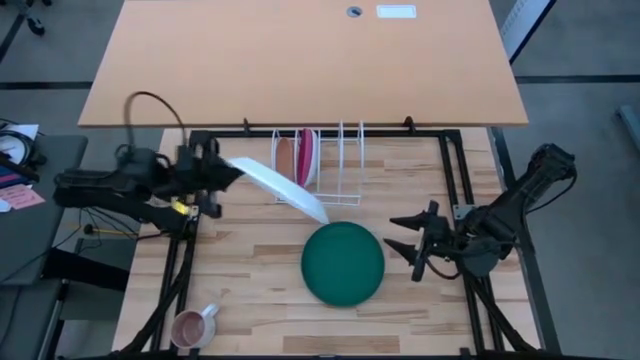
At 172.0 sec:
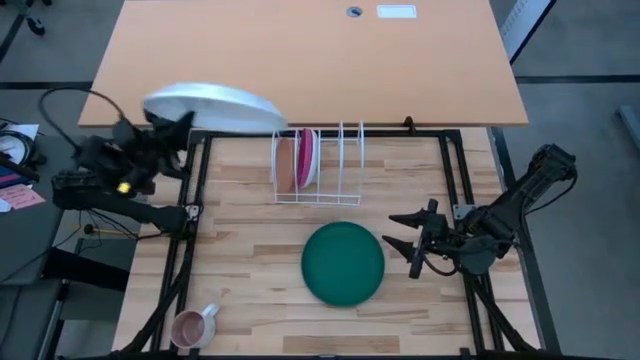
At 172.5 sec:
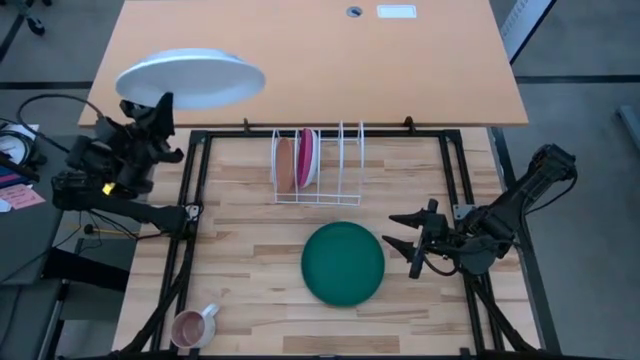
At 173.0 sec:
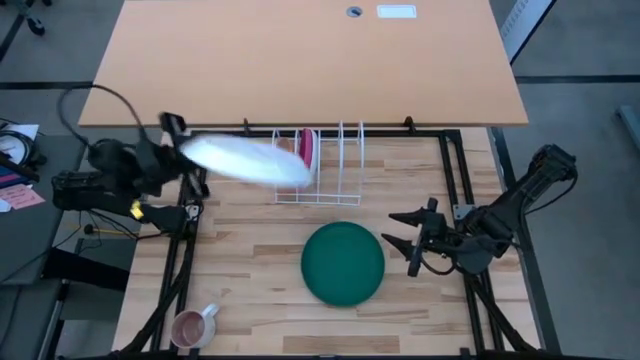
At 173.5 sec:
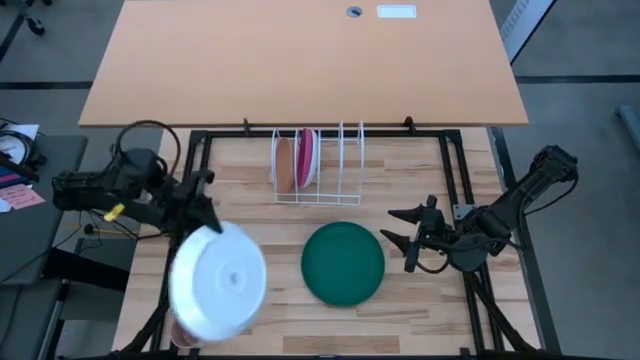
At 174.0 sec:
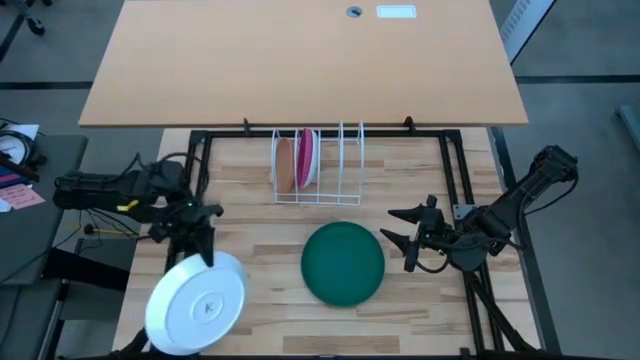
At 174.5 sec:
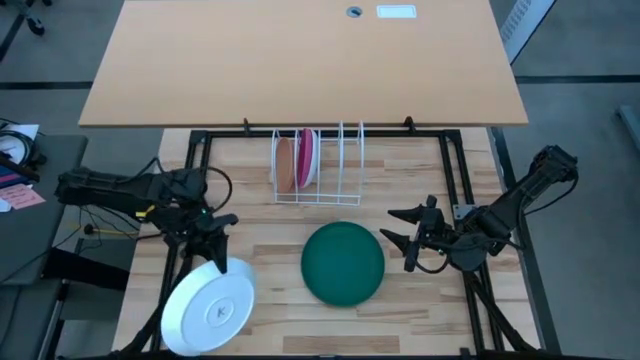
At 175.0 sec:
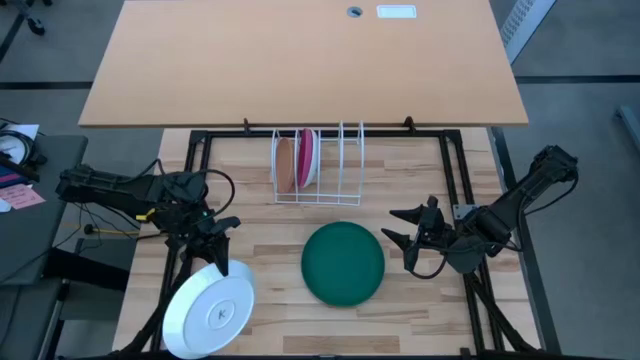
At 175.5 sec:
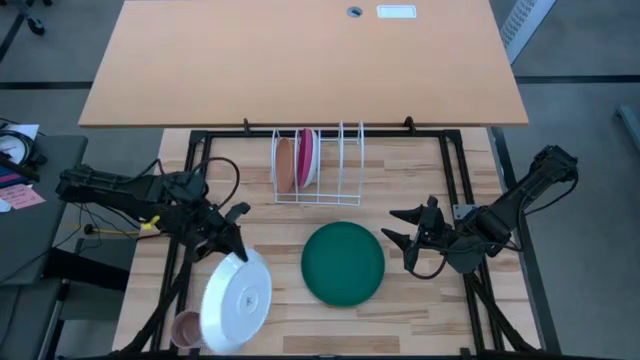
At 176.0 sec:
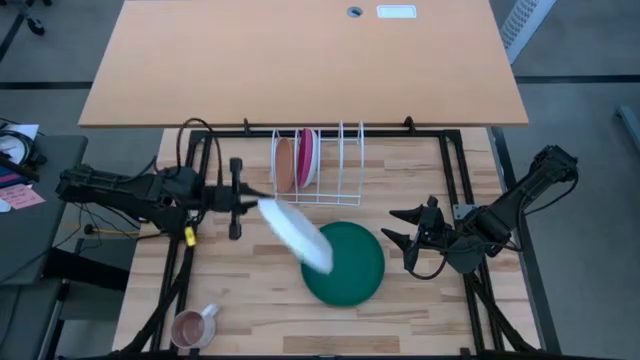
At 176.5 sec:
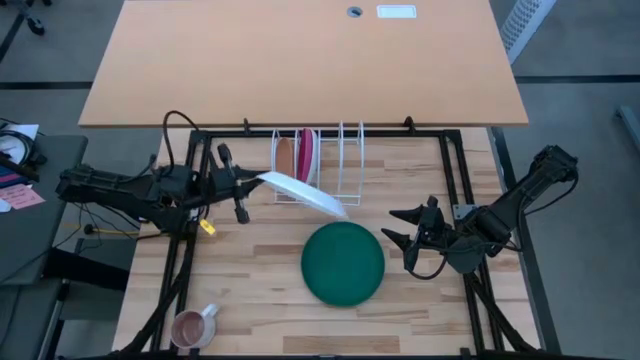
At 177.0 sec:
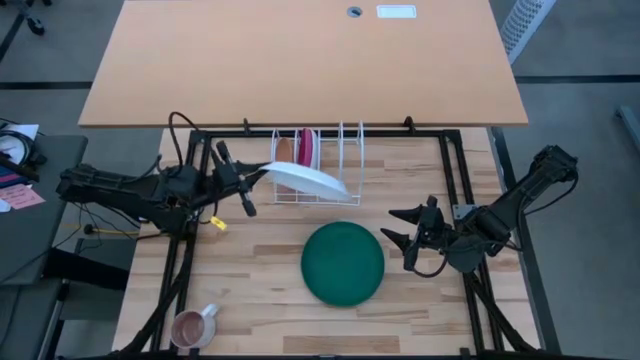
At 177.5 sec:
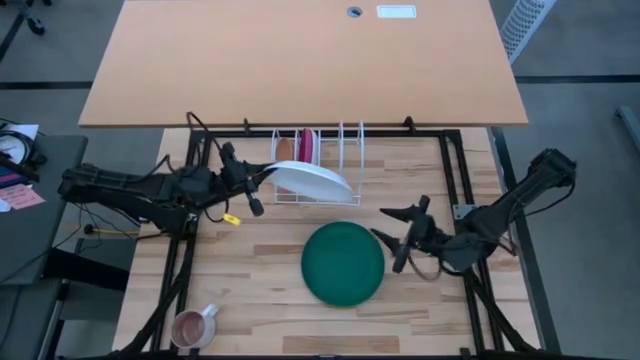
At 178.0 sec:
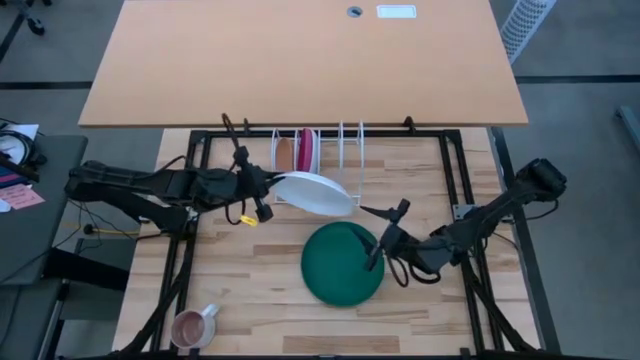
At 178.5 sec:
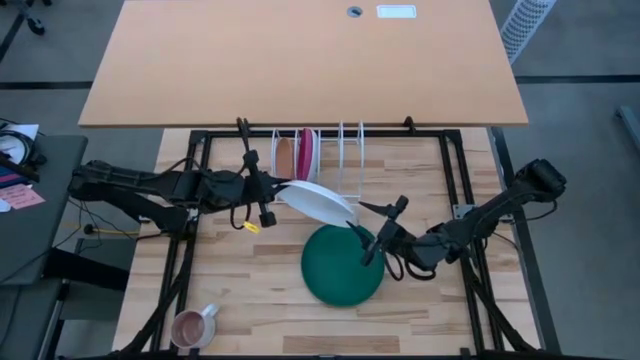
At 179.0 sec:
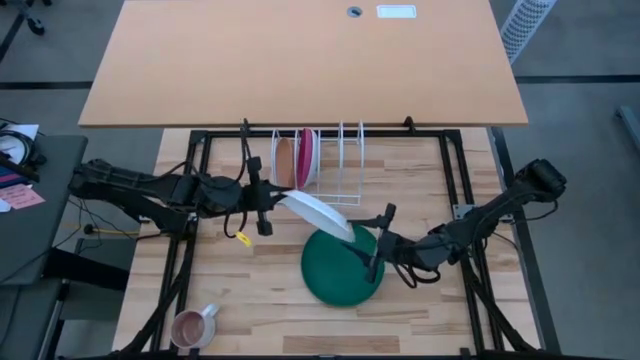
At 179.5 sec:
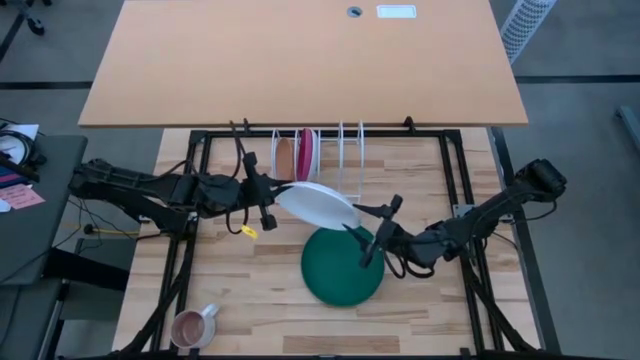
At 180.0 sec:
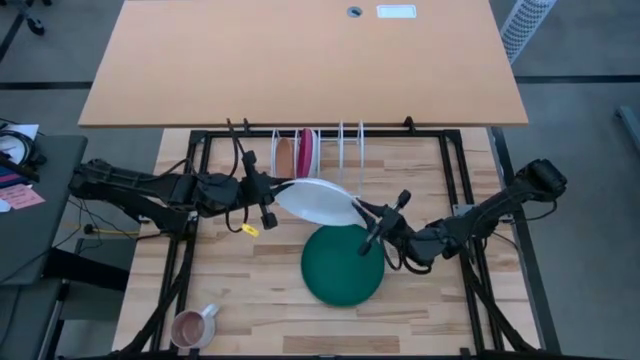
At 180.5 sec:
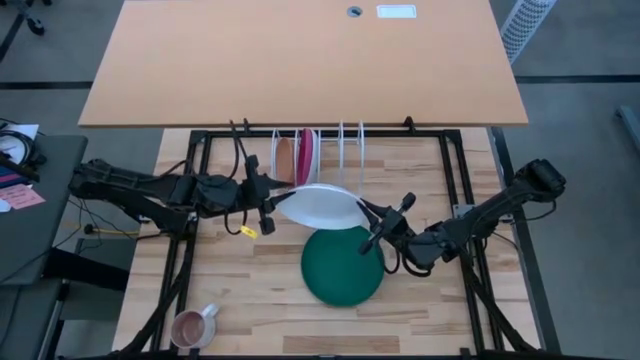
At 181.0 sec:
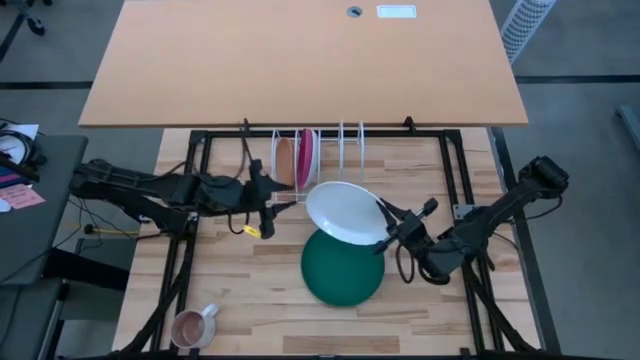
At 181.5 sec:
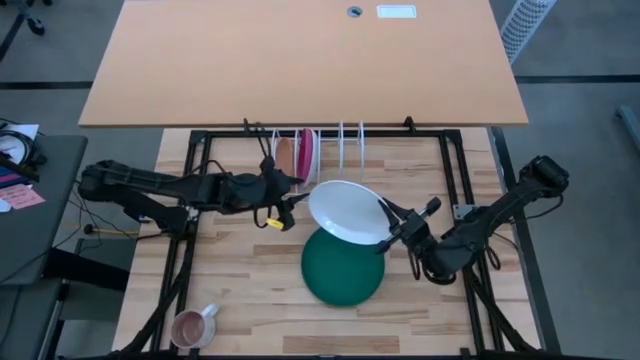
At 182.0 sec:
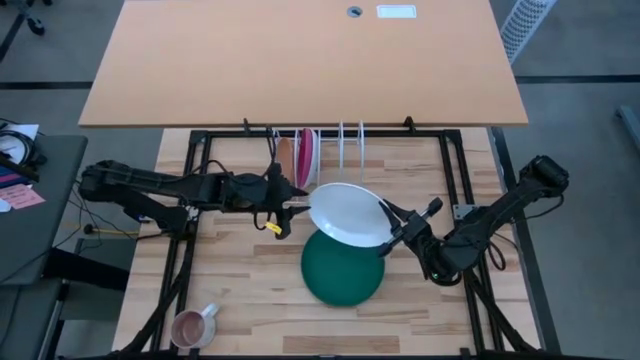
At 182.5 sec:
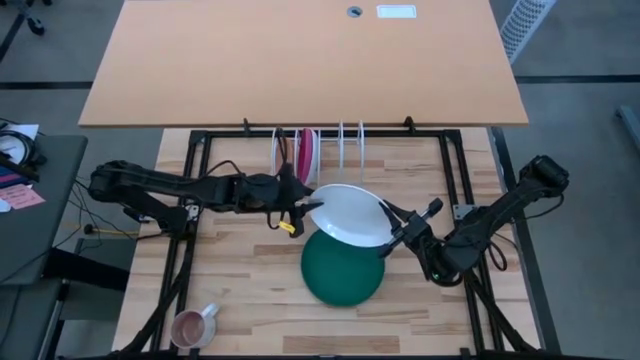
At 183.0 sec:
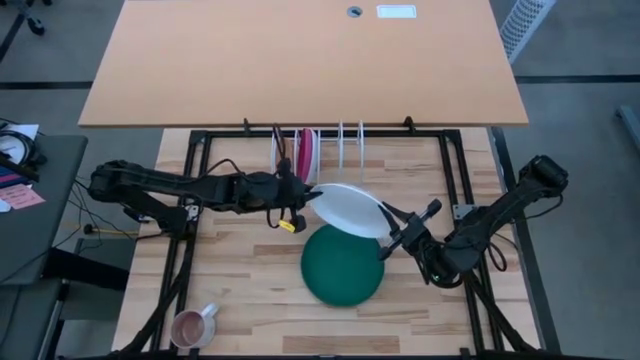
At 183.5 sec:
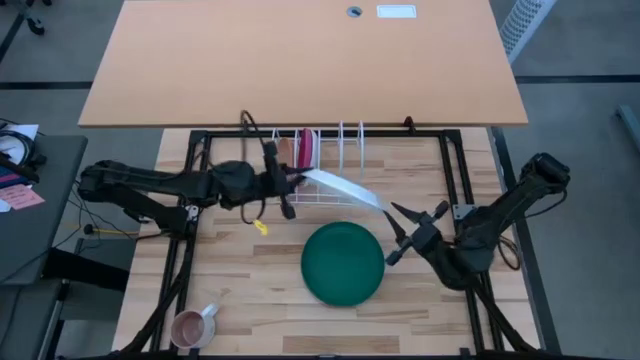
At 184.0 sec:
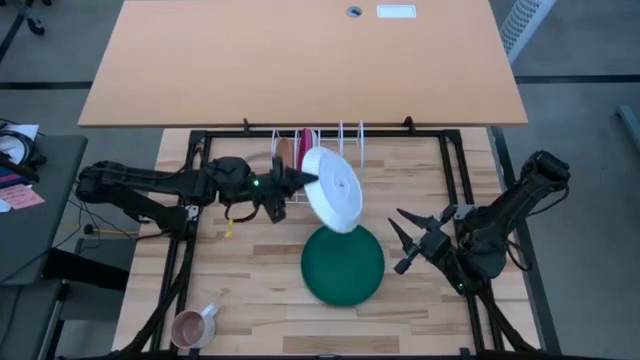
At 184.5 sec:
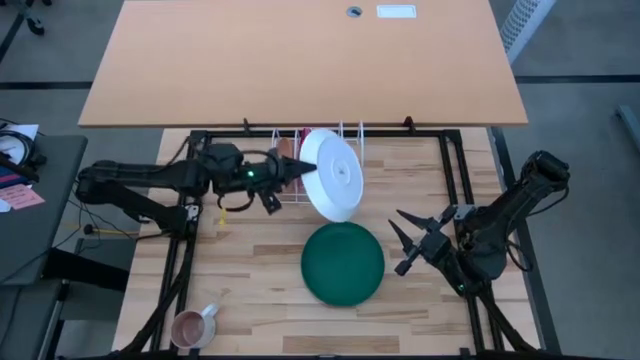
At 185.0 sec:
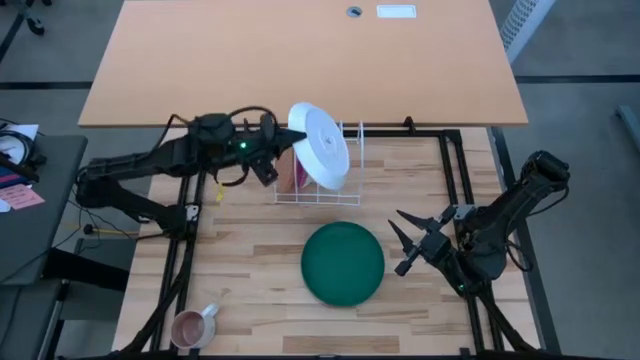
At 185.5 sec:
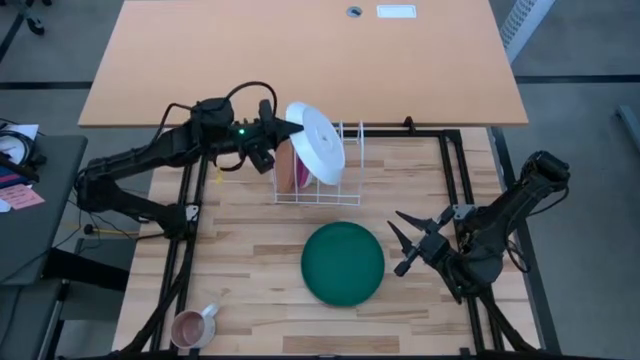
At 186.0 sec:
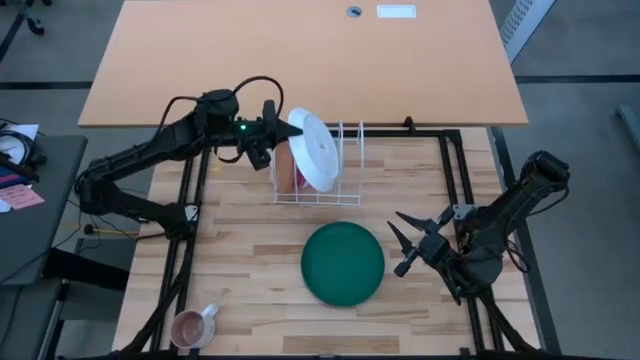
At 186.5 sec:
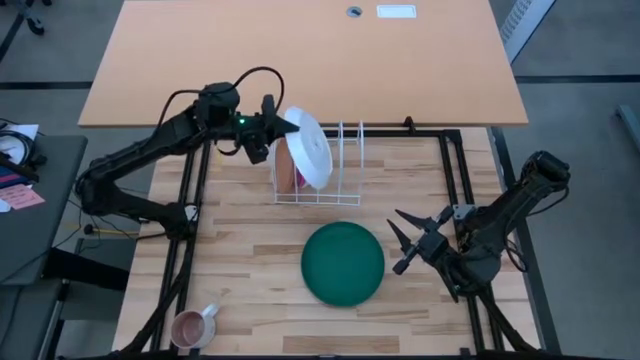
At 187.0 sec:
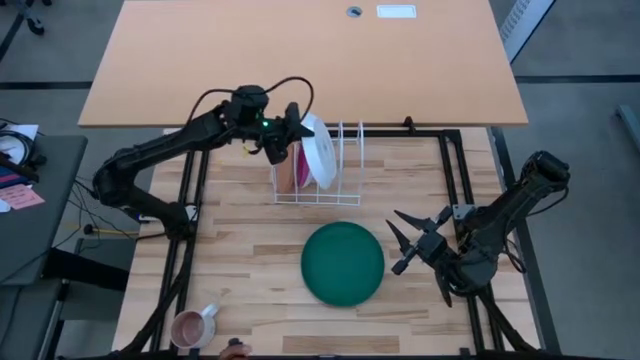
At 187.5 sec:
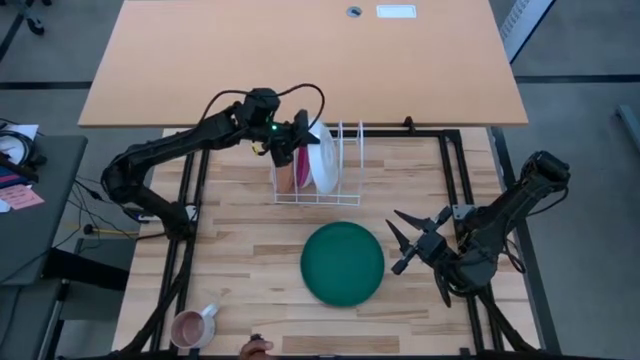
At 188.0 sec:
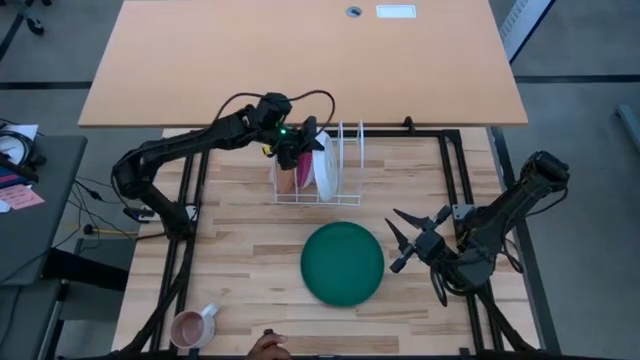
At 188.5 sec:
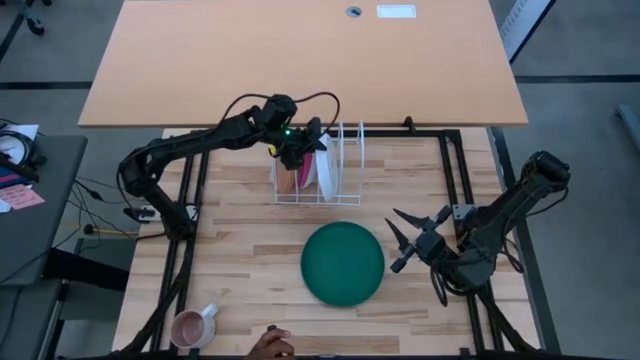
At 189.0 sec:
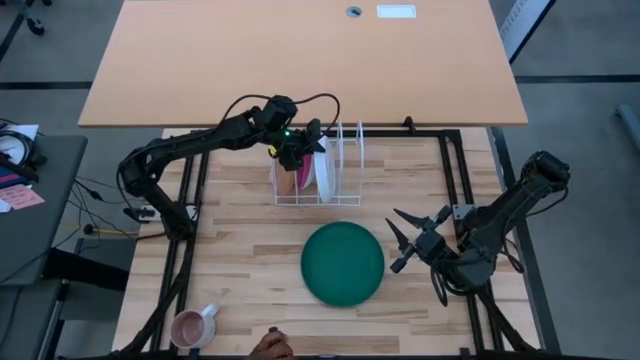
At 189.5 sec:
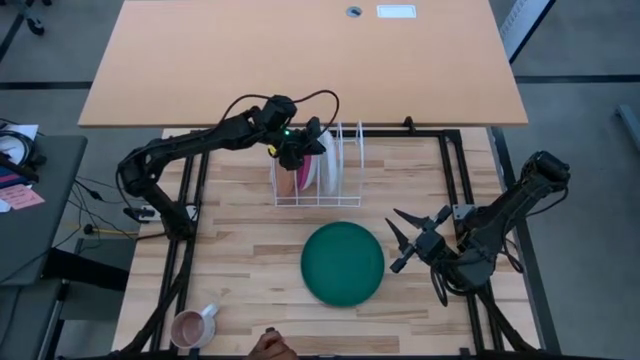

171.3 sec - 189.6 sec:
Task: Sort dishes
Put the white plate in the dish rack

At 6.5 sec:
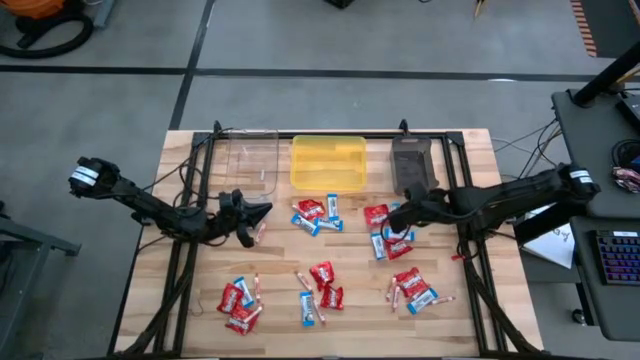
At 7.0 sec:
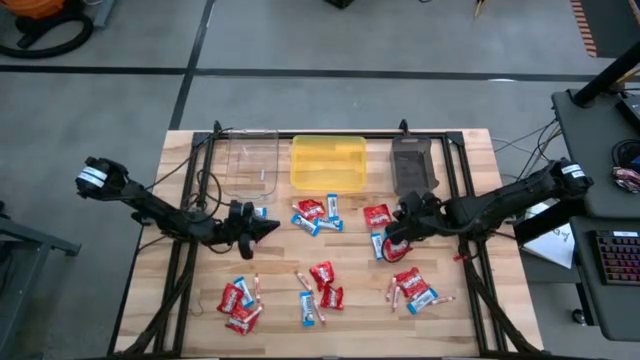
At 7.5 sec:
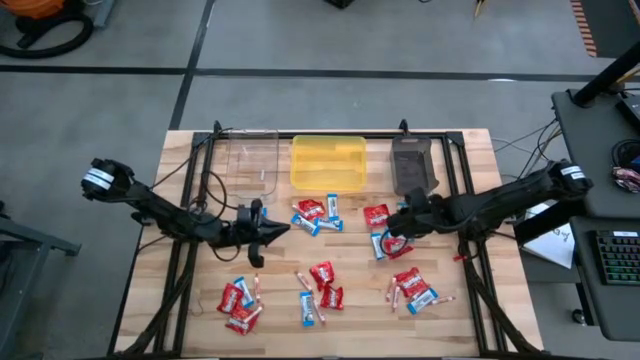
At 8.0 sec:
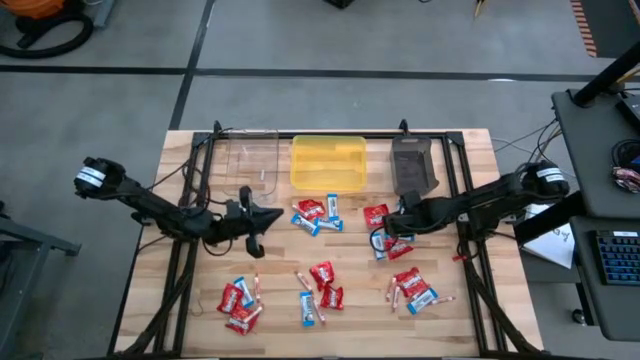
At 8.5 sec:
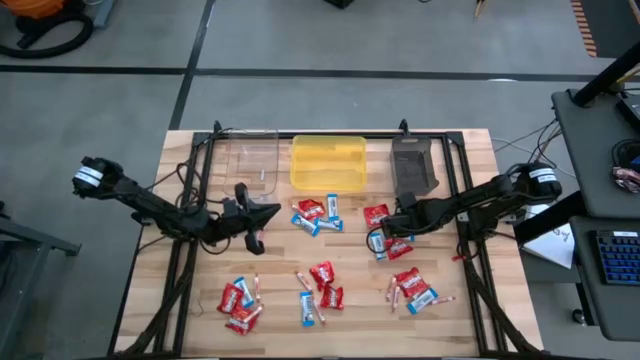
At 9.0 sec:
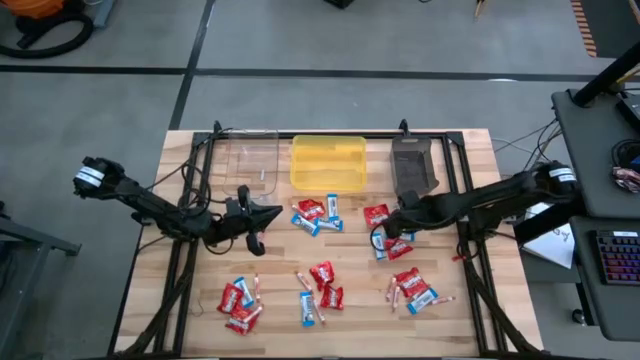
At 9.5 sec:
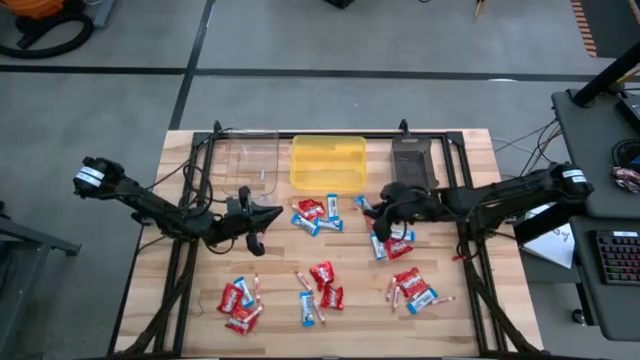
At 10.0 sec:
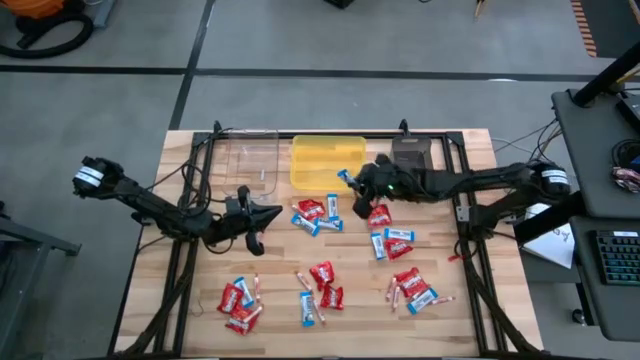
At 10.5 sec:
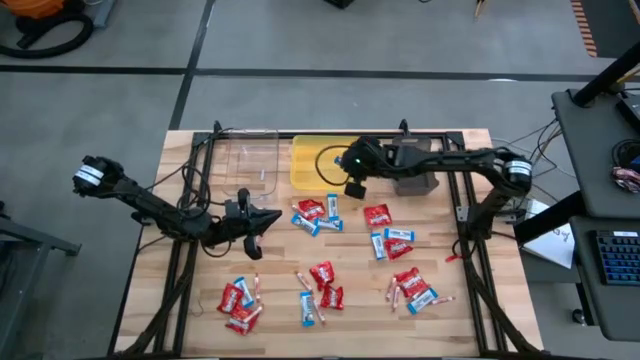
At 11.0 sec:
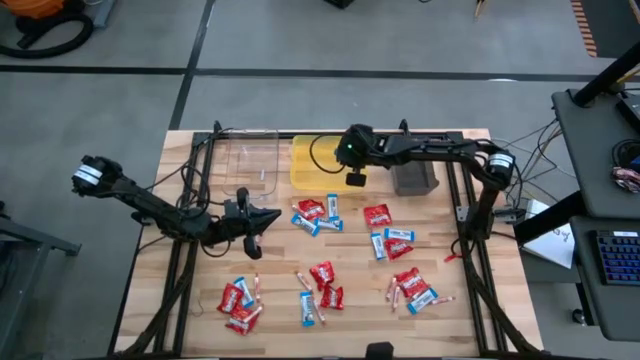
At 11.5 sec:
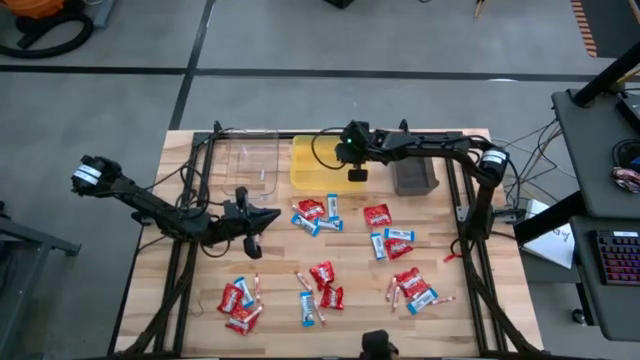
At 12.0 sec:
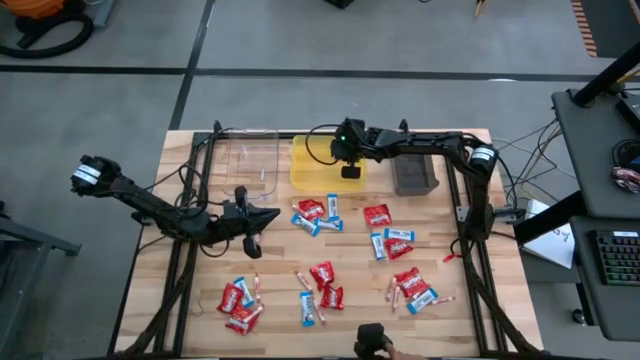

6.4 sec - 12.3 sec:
Task: Sort candy
Put the white chocolate into the yellow bin
